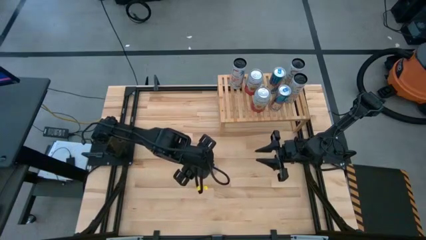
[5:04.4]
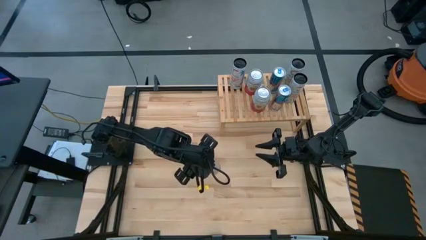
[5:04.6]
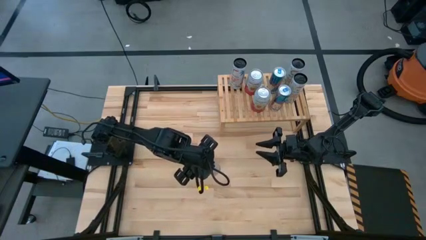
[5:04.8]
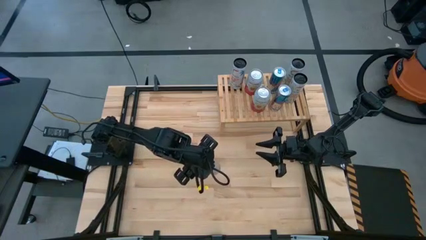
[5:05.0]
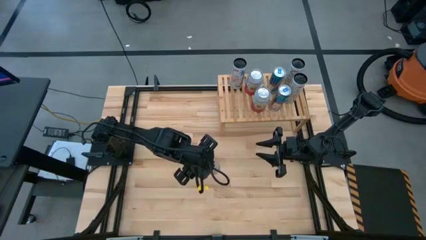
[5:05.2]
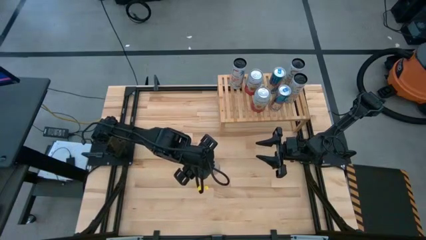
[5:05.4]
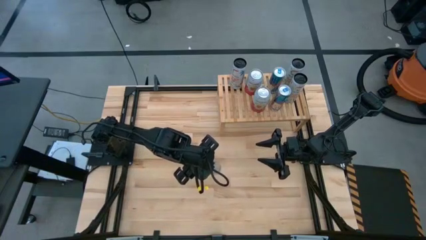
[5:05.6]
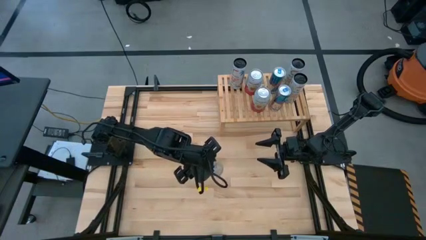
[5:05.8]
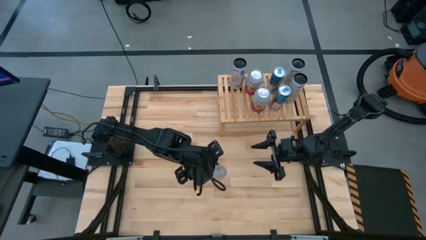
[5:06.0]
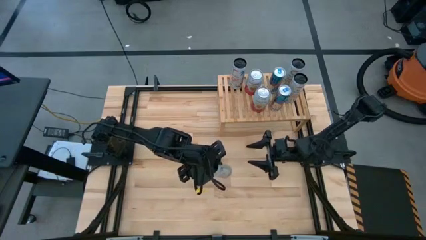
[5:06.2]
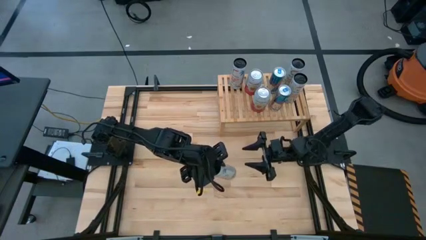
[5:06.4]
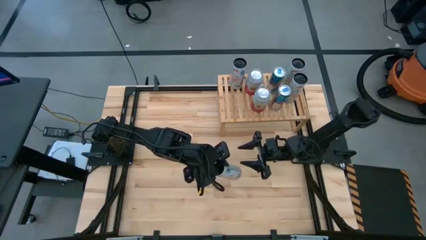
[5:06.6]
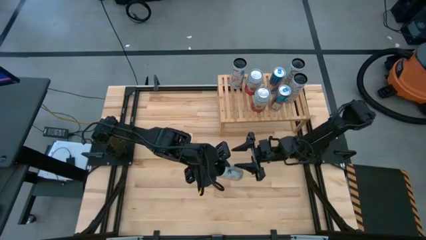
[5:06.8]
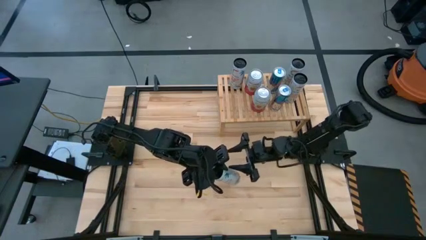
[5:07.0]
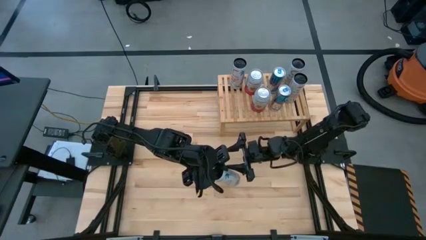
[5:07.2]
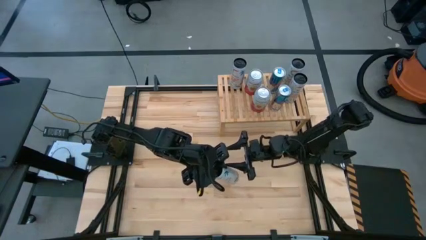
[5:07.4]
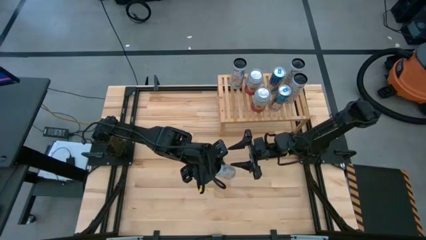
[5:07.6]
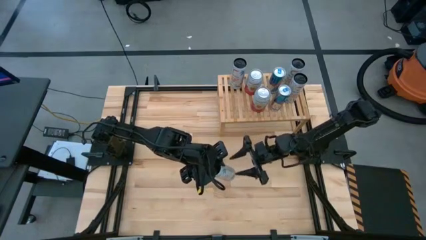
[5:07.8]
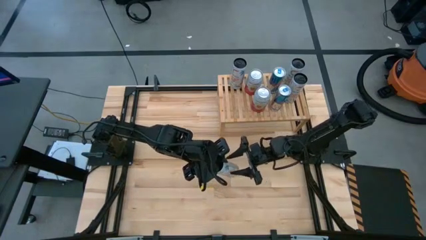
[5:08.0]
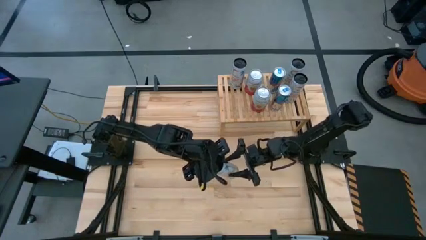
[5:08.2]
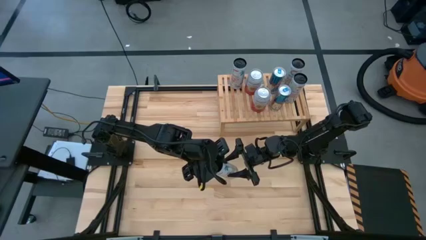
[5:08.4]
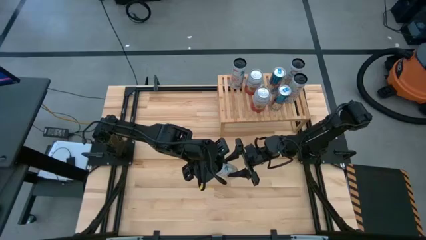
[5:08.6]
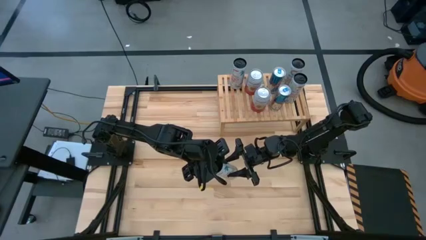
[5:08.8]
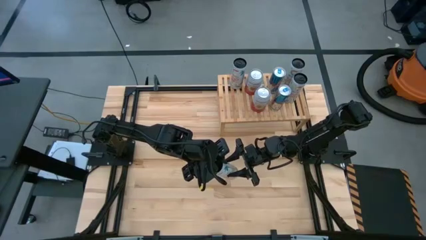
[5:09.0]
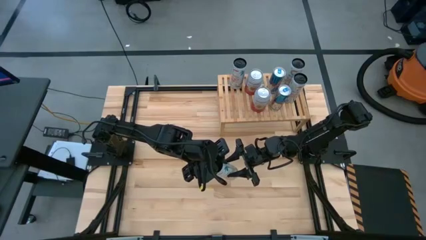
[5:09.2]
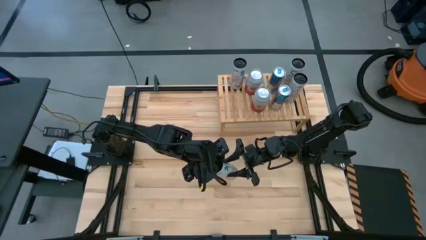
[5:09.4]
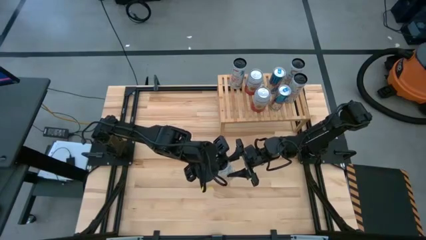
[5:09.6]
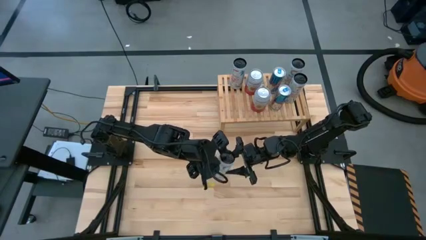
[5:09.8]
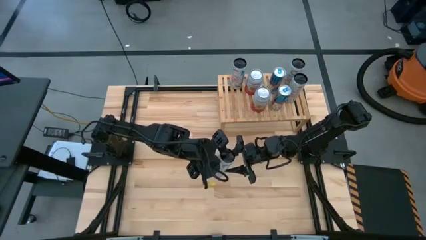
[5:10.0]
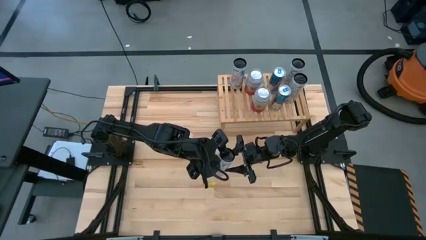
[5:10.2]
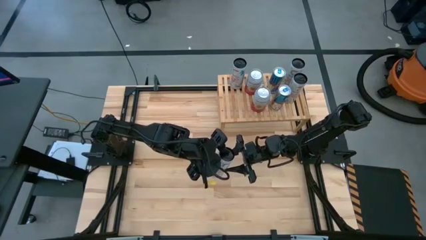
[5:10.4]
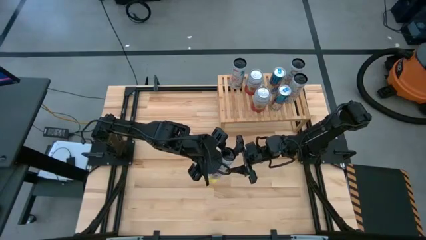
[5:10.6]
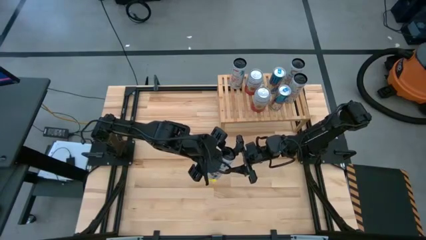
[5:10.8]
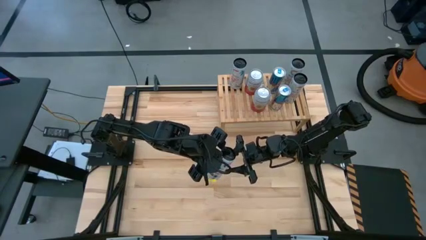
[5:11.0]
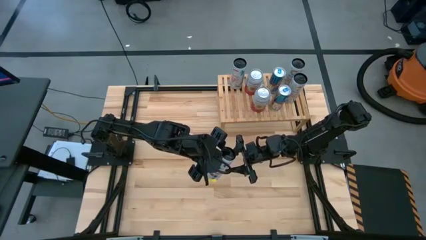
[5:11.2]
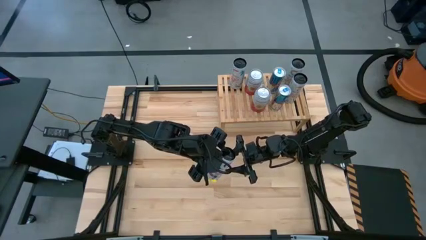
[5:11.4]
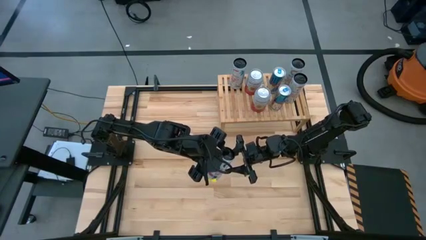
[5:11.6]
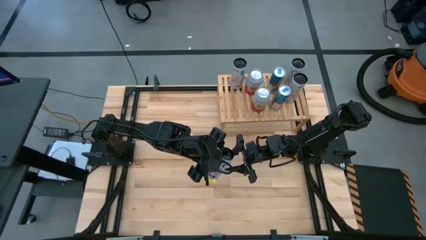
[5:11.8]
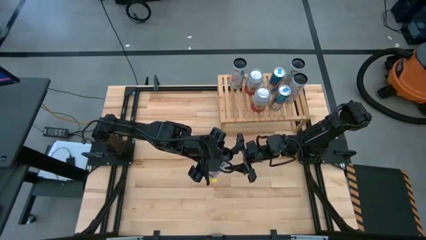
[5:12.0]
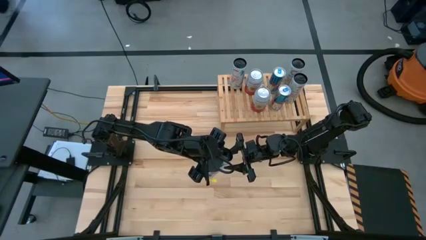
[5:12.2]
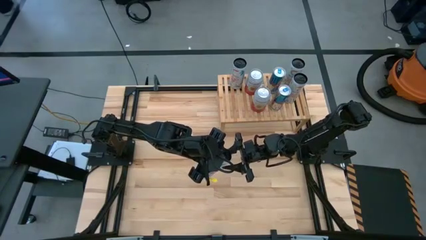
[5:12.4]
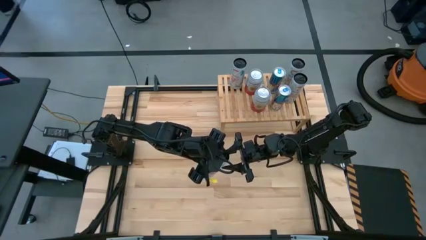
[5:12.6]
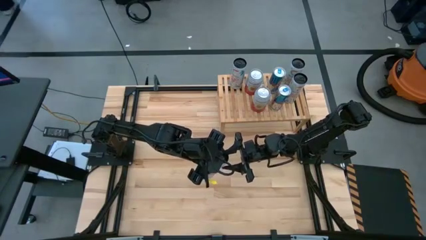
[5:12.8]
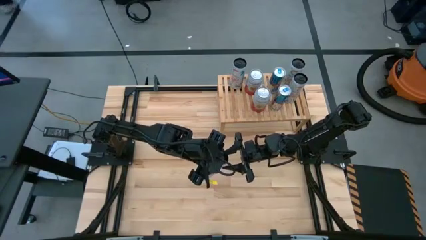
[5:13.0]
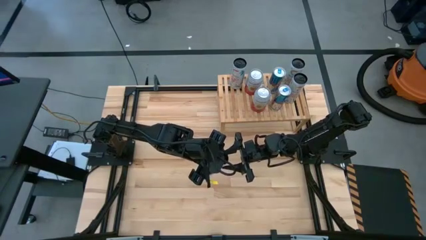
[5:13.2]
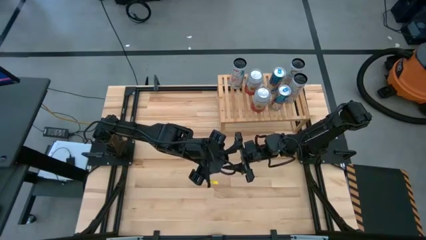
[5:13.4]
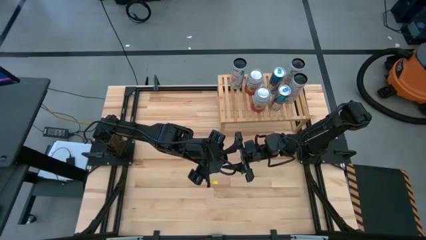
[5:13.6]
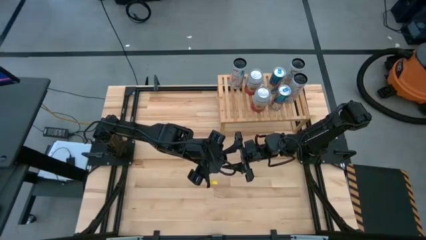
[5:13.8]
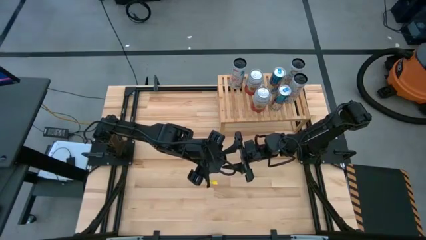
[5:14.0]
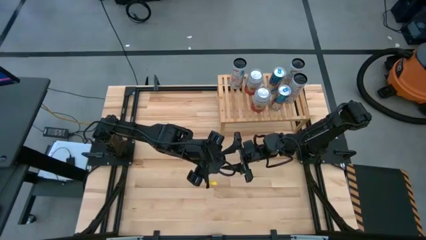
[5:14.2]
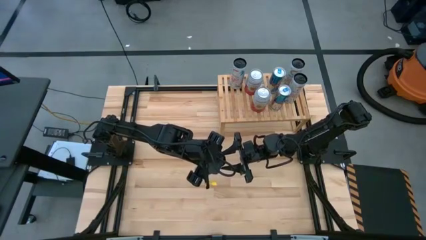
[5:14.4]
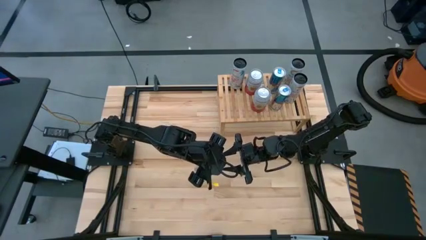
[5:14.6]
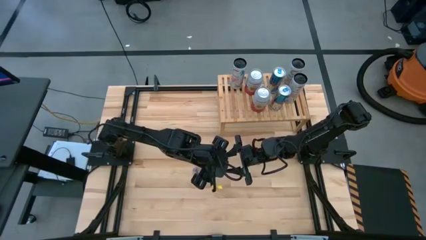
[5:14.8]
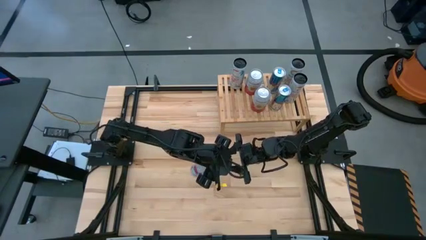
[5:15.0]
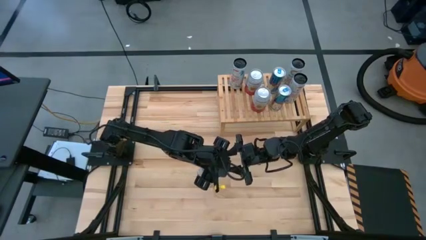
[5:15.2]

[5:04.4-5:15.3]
Task: Place canned beverage on shelf
Put the white-pink soda can on the shelf aligned with the other white-pink soda can
